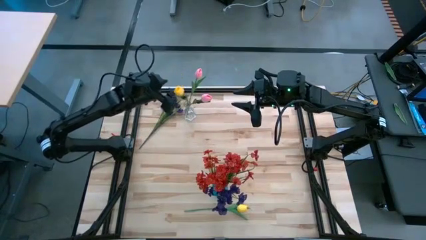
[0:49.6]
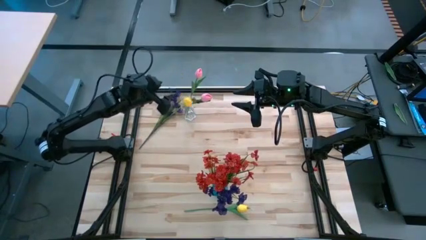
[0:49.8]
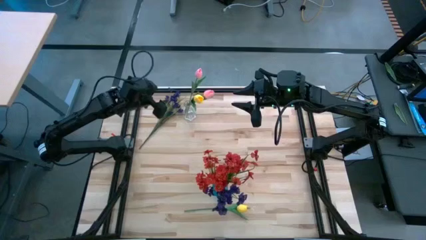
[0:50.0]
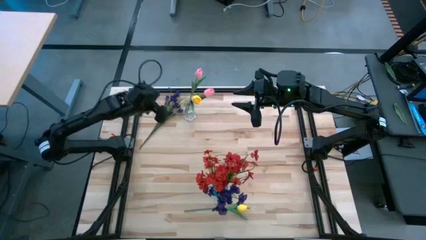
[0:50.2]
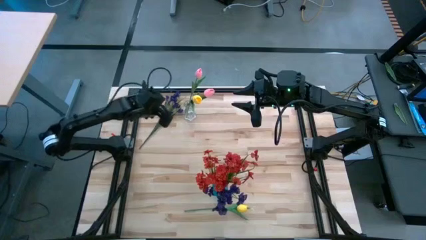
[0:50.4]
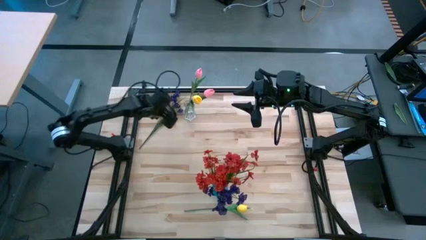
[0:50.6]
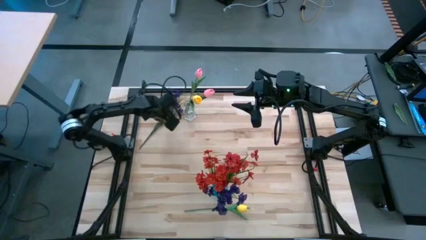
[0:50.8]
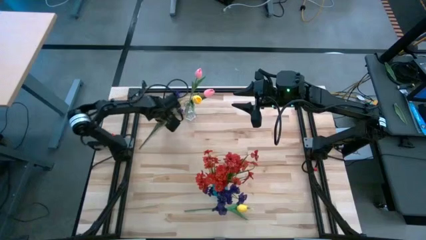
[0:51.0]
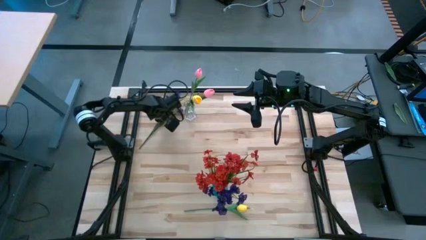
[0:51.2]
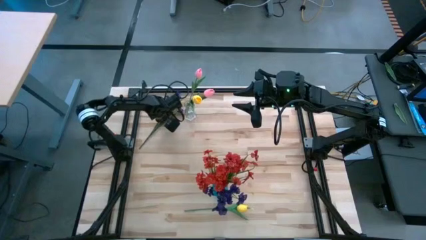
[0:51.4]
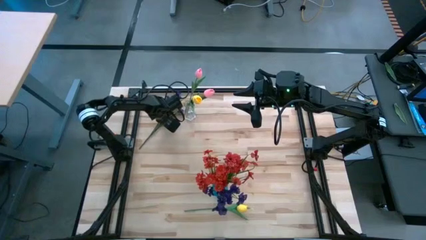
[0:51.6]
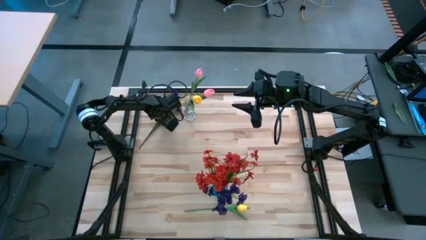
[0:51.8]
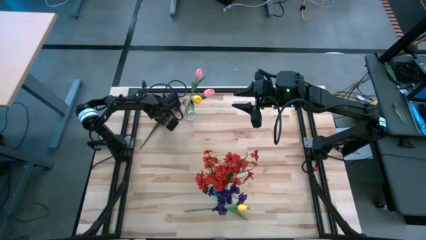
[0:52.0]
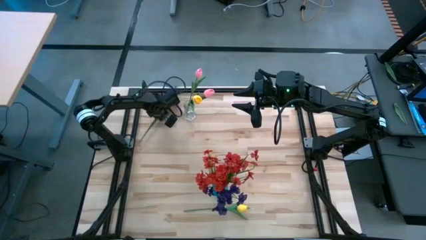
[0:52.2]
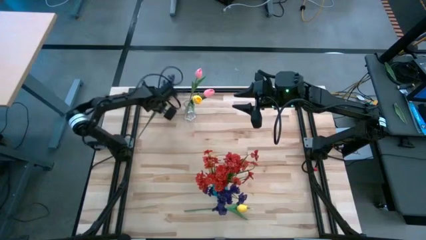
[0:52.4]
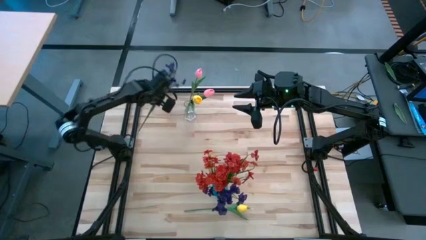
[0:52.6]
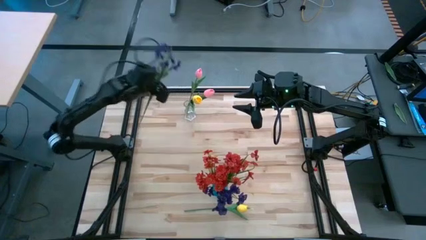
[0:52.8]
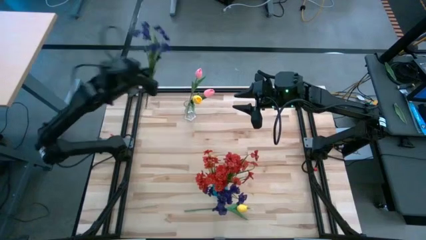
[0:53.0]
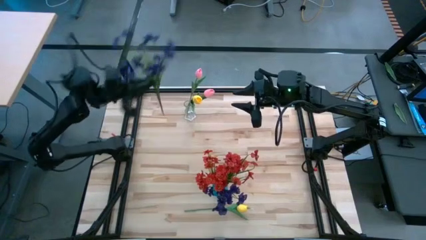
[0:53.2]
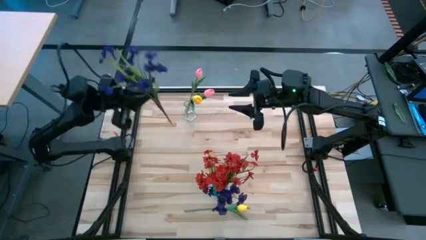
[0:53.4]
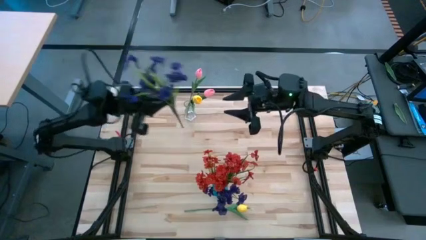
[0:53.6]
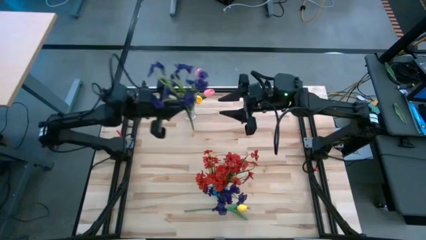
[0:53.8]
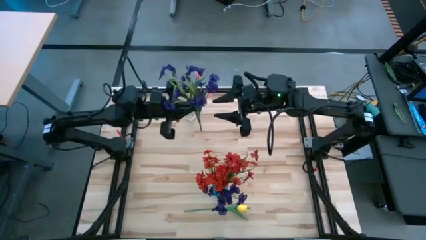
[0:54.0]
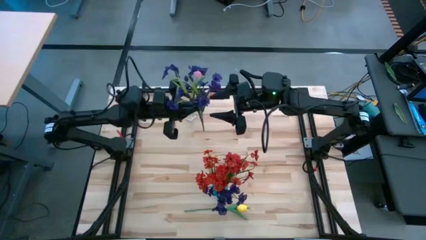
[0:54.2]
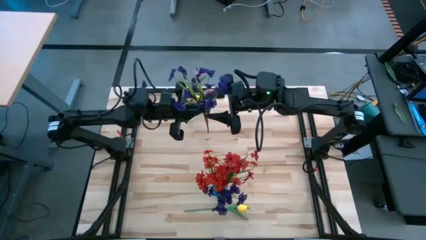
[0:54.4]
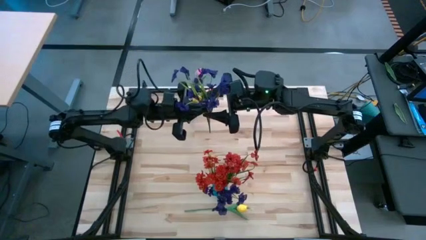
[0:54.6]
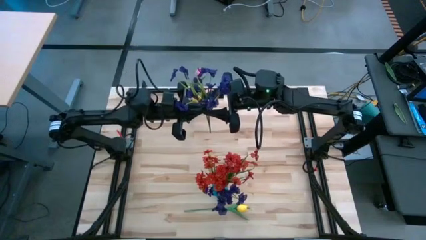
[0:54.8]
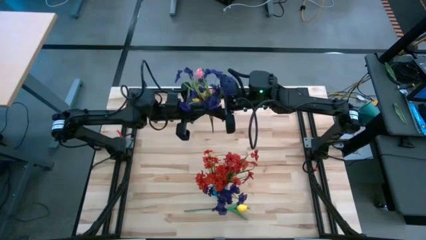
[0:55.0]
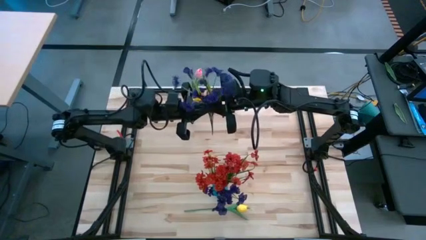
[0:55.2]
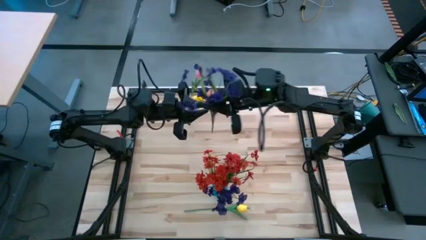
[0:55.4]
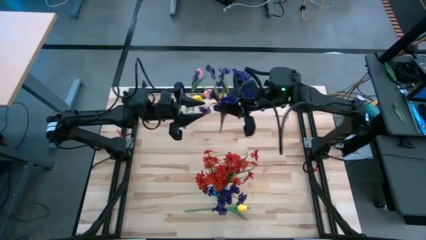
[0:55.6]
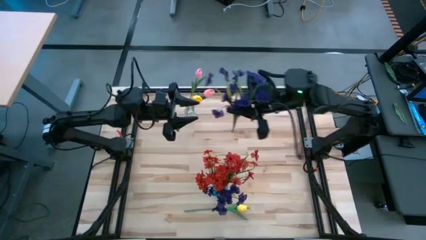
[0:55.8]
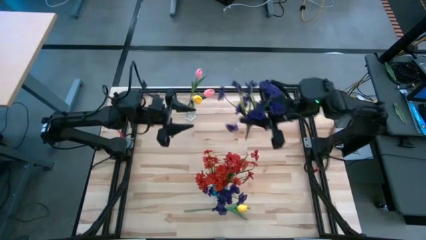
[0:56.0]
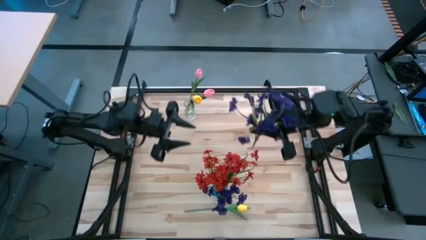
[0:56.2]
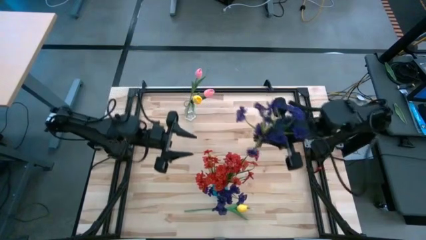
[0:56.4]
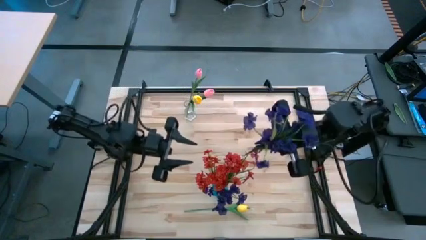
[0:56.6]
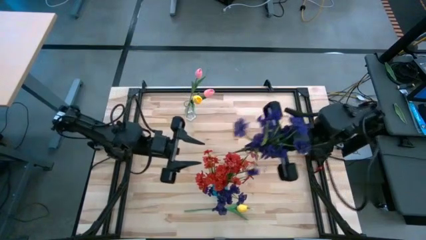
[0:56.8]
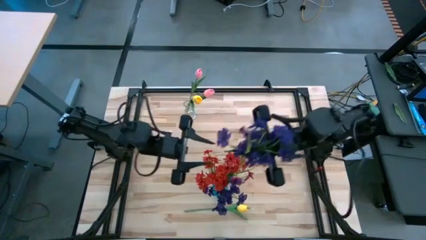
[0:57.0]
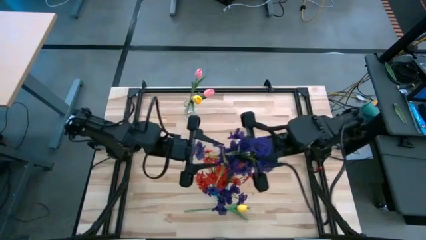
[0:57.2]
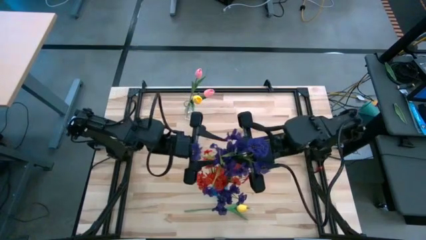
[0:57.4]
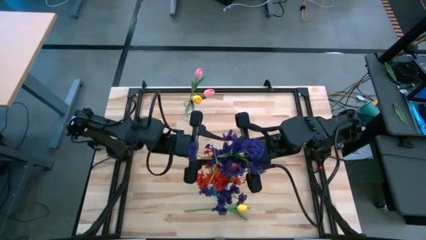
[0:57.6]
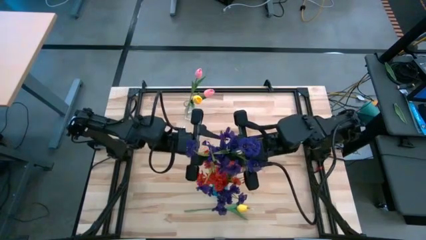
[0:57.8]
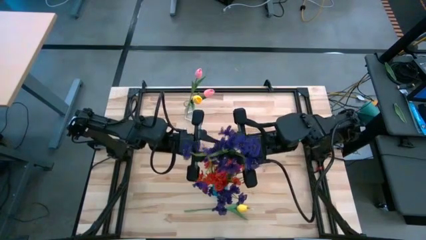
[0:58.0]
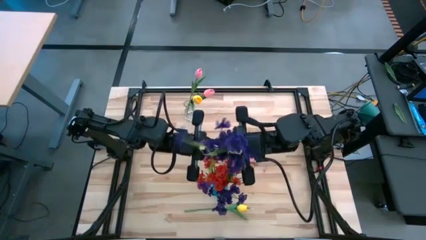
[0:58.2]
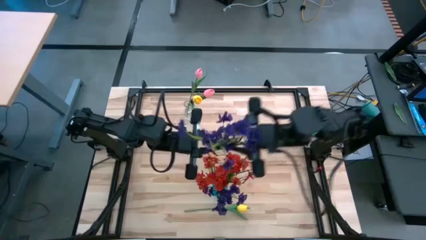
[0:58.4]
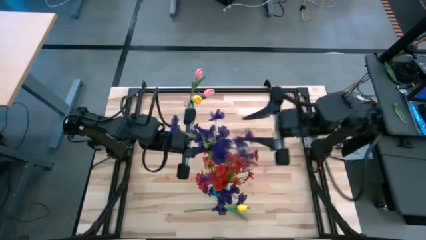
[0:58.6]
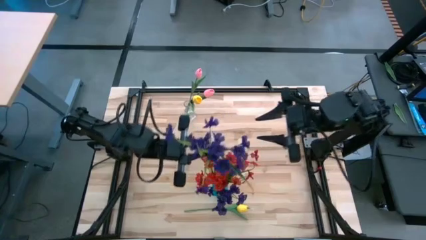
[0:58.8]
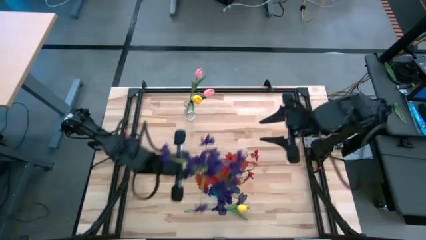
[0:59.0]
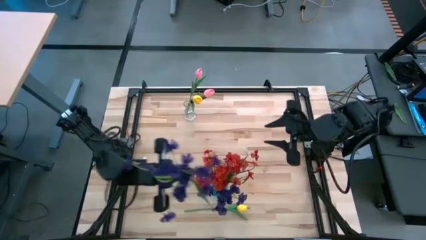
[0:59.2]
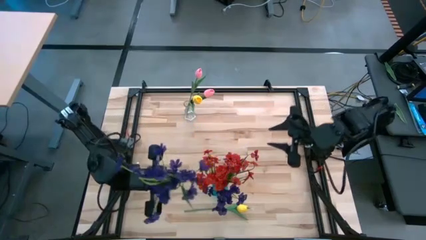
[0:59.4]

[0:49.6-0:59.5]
Task: Sort flowers into vase by color
Put the violet flowers into the blue vase
